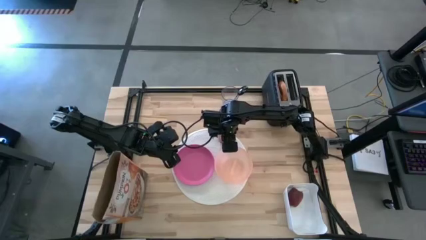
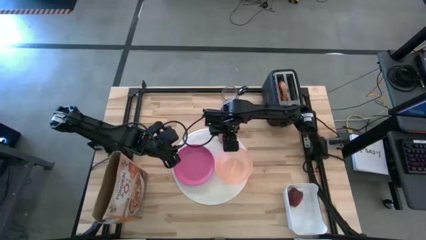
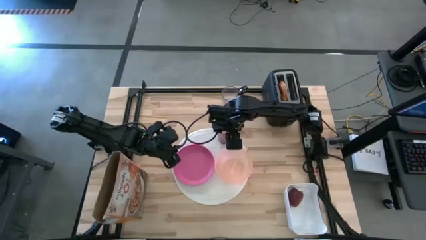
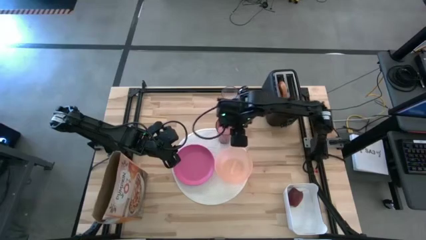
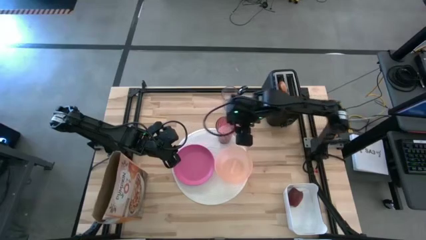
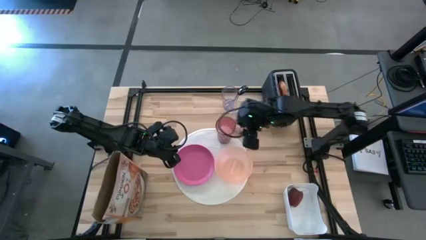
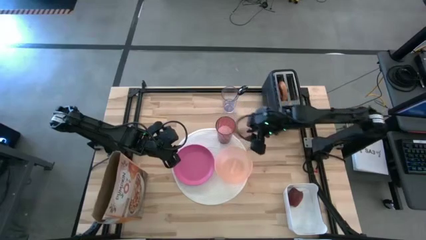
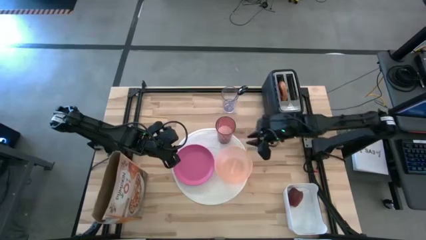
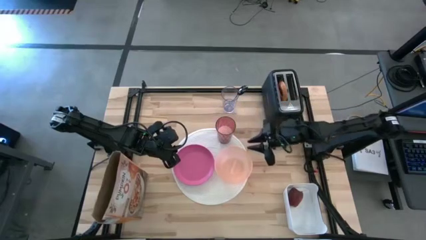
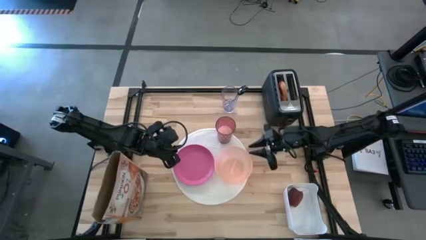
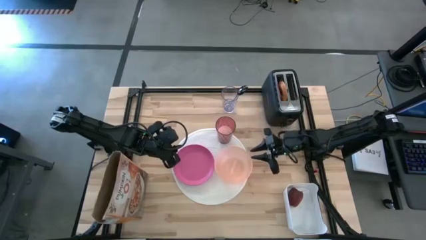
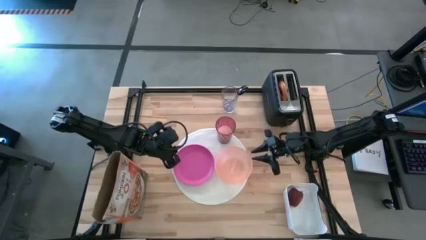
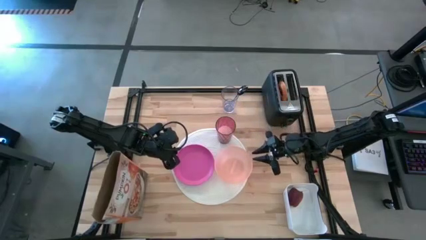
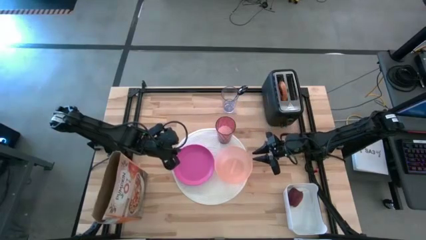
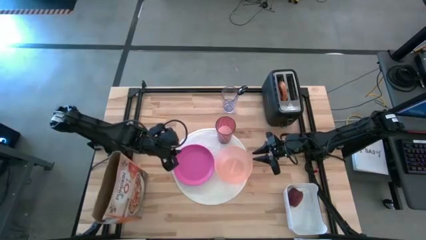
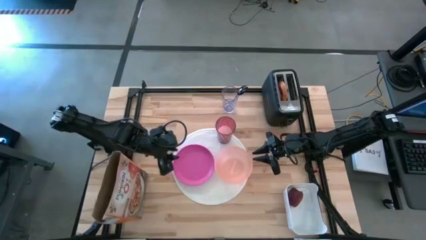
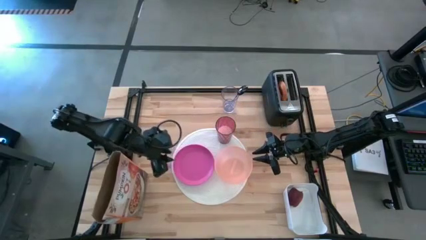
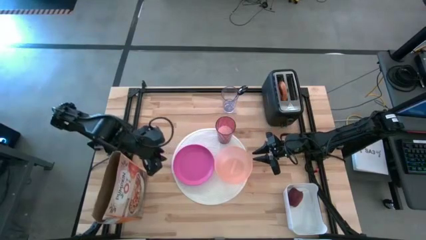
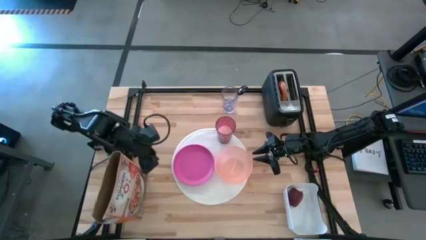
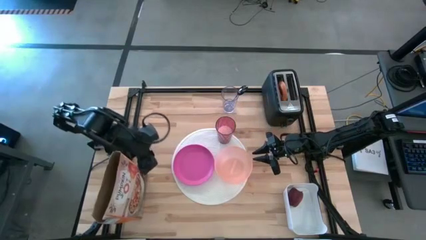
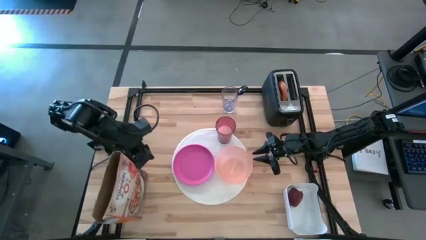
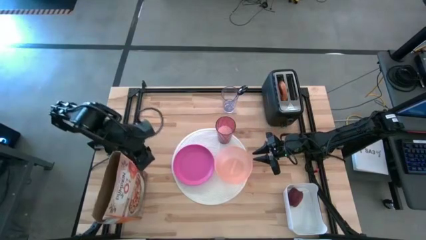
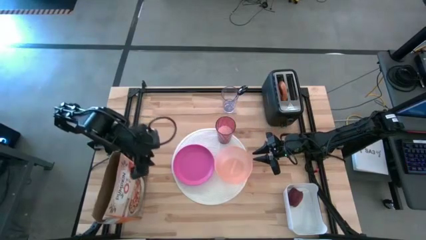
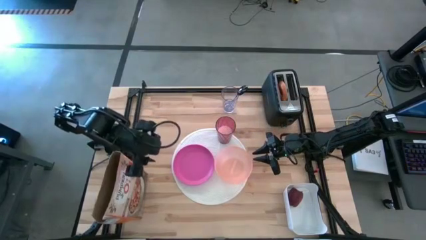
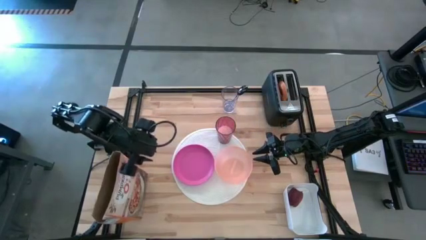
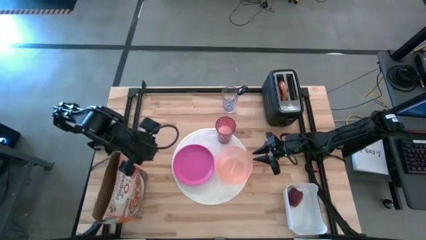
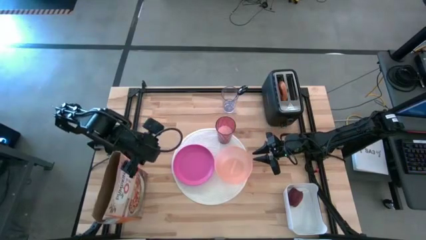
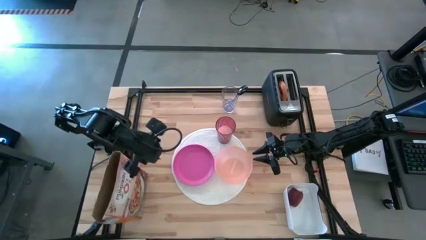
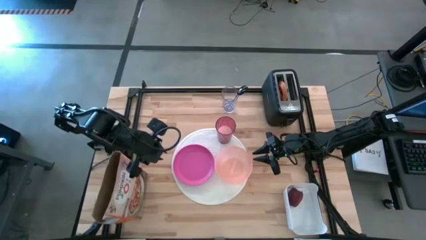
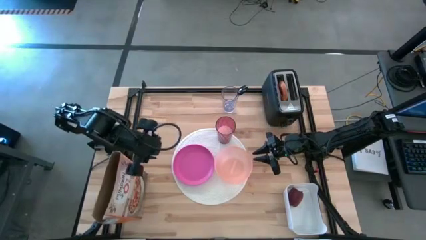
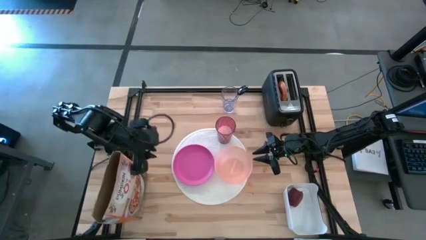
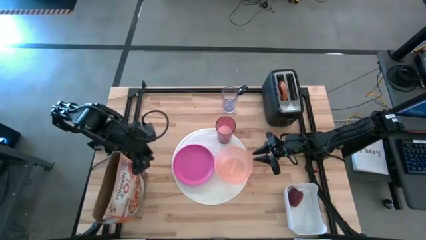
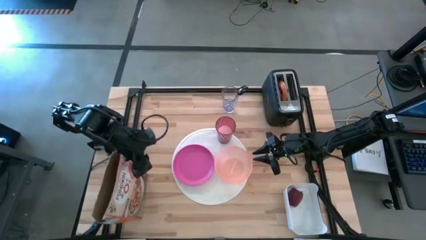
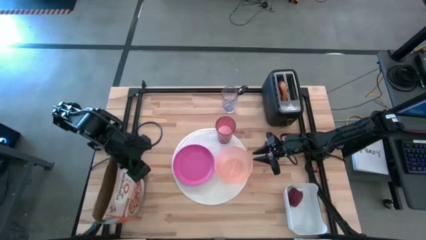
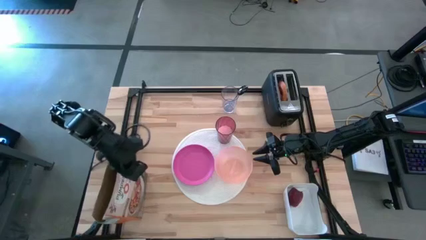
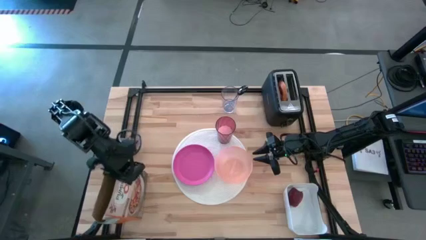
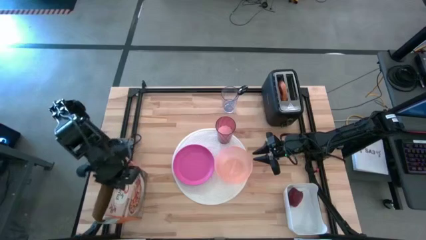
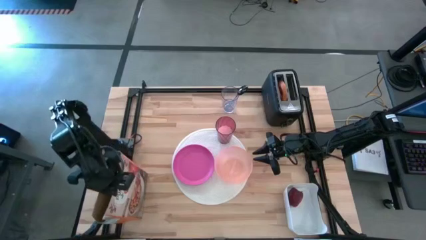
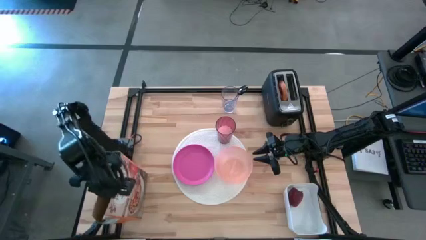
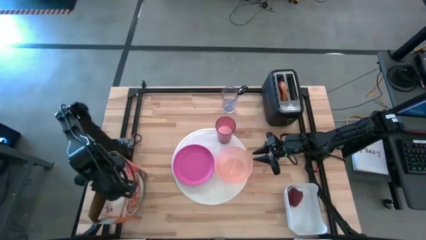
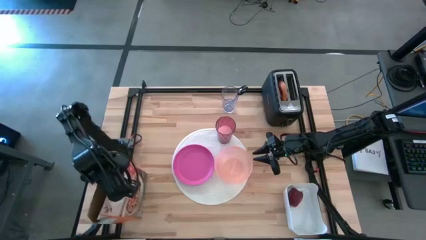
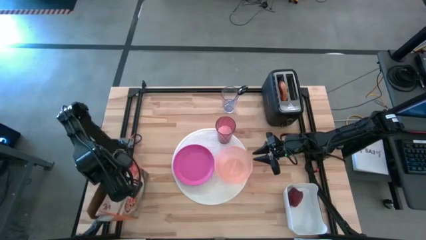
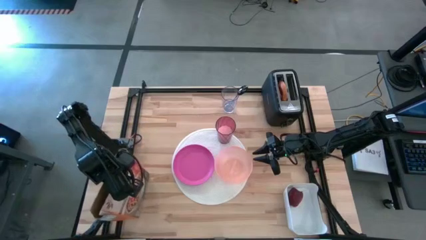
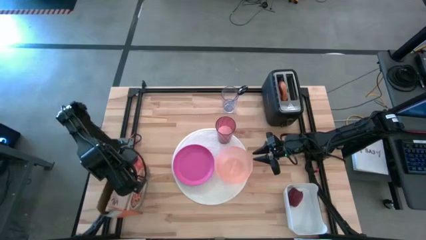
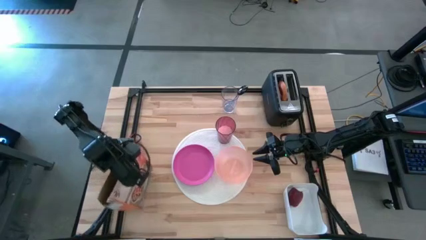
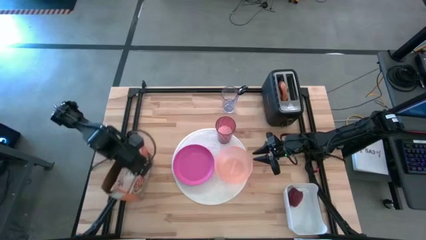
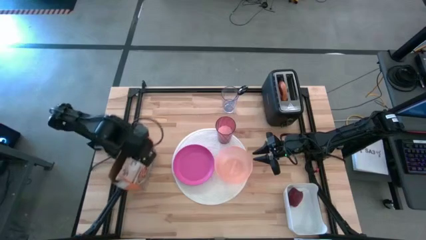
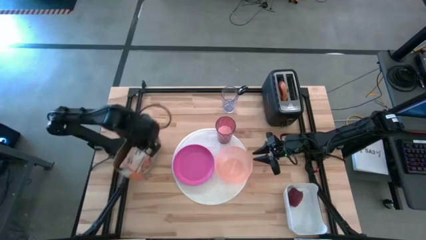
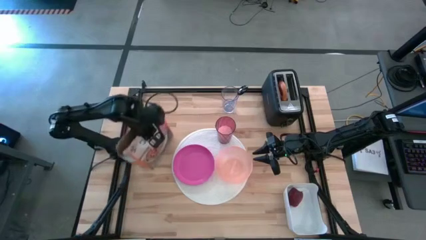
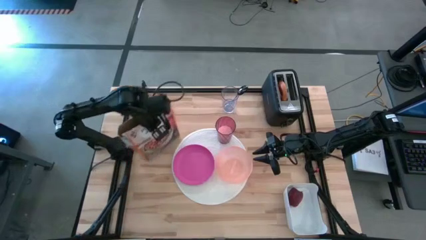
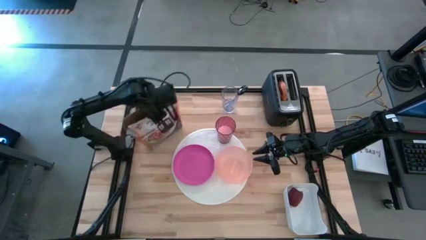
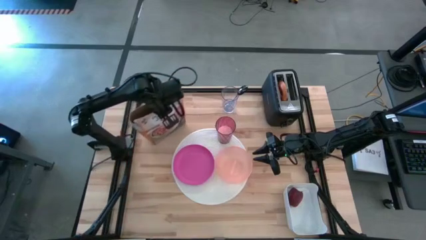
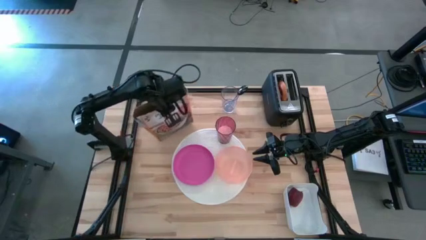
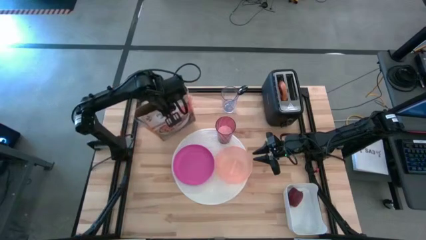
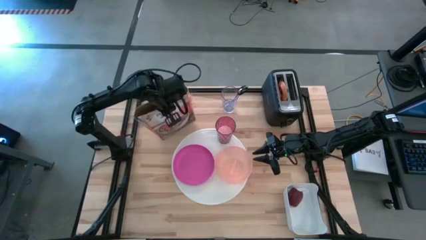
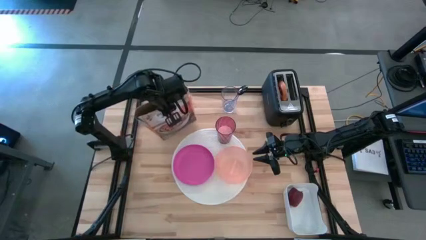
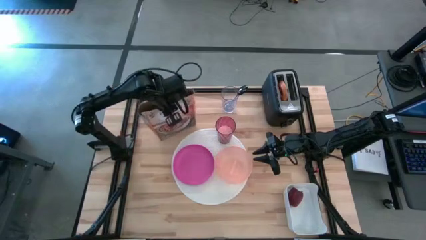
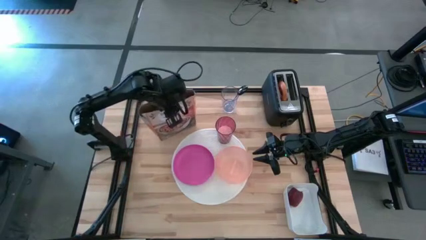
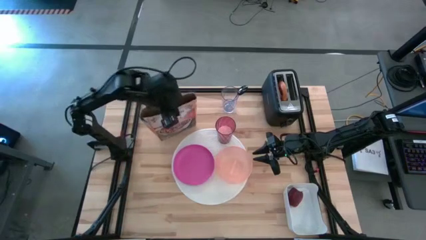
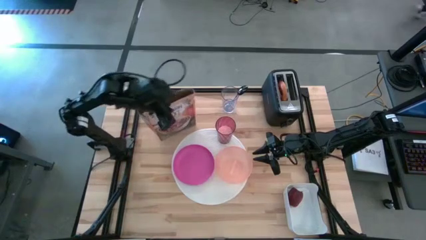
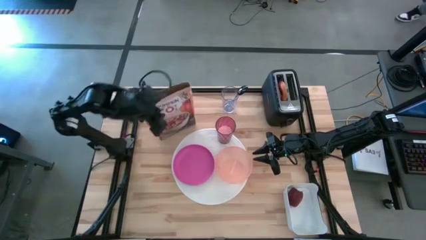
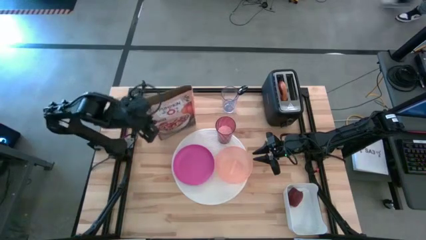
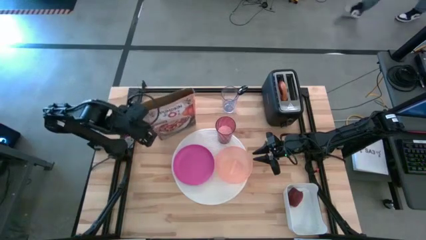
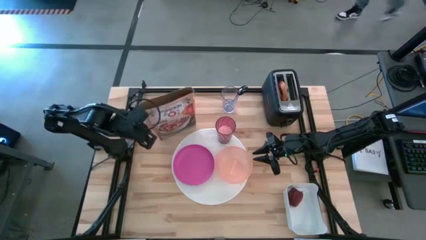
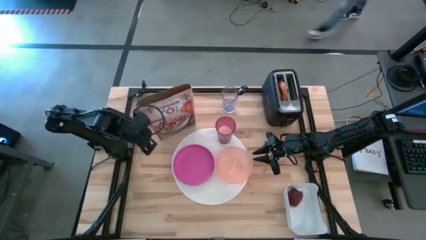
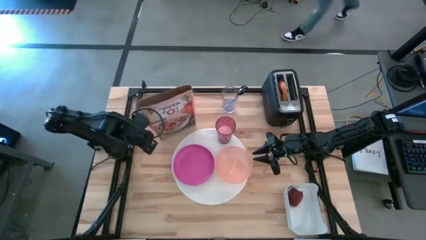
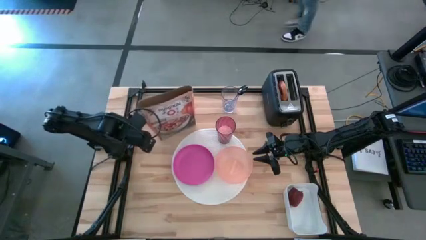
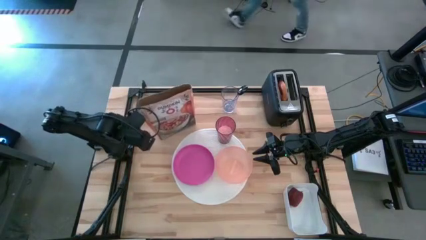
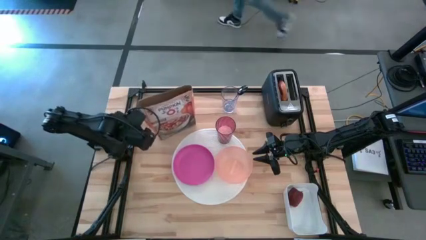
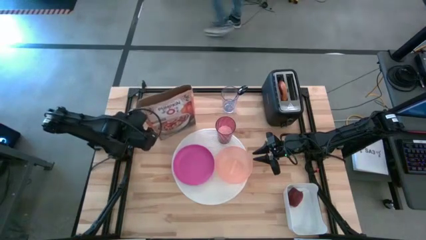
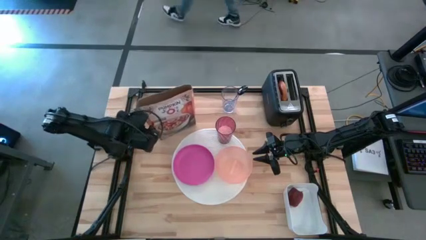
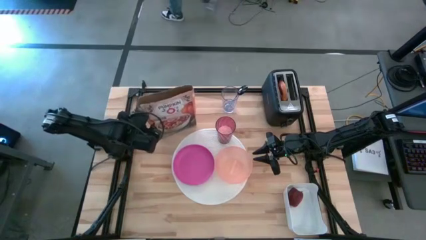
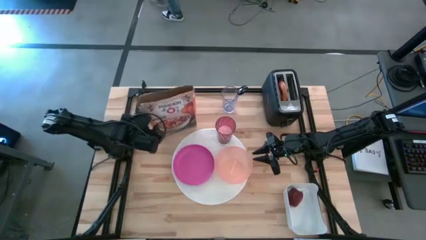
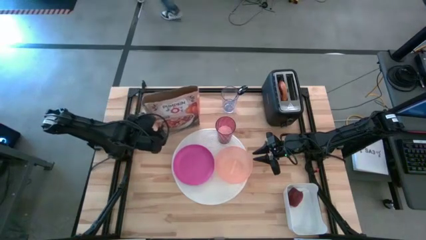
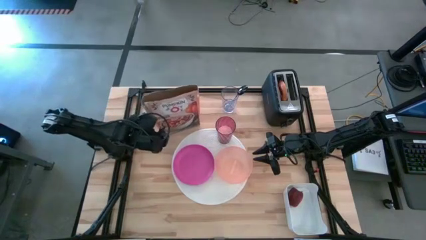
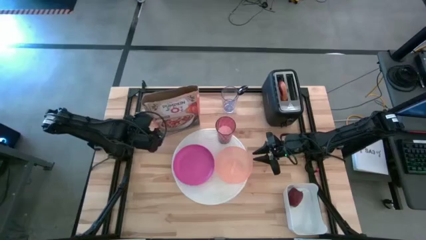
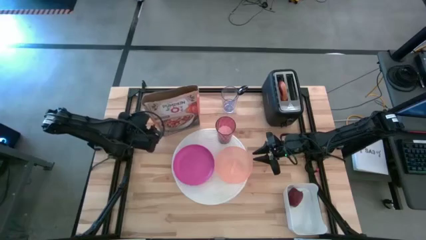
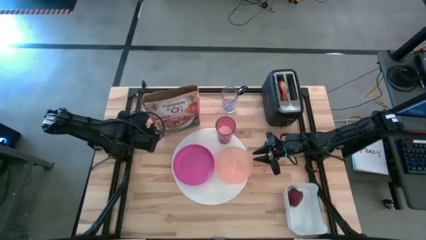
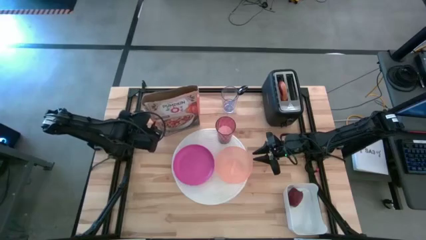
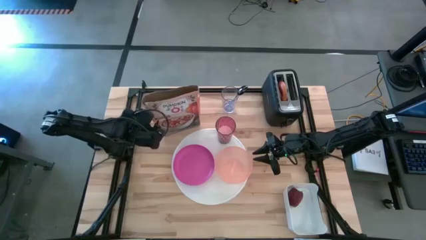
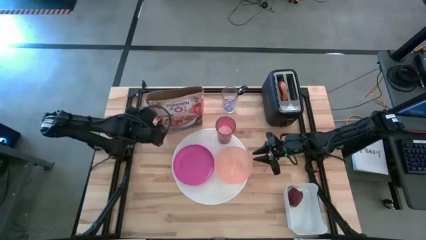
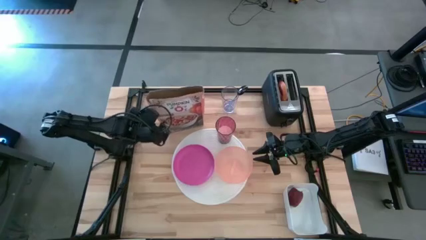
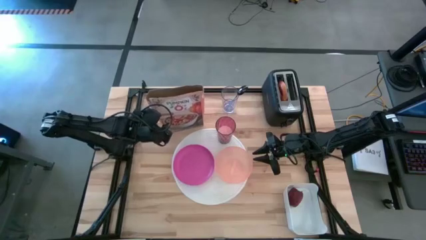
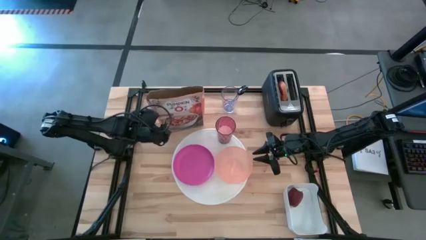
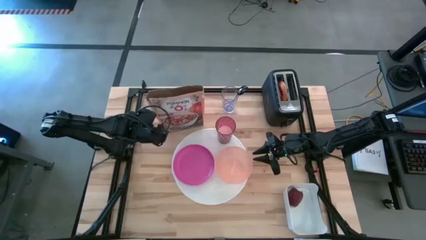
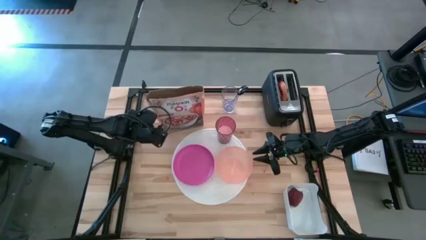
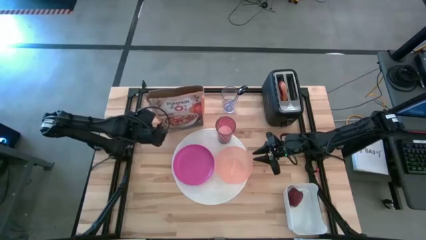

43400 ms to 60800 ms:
Task: Arrange a breakfast setting
Pour the cereal from the orange cereal box into the orange bowl on the white mat
